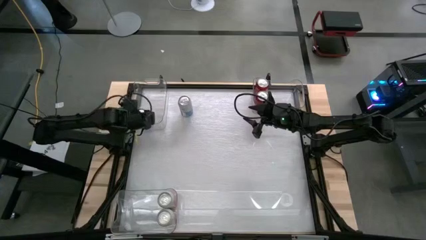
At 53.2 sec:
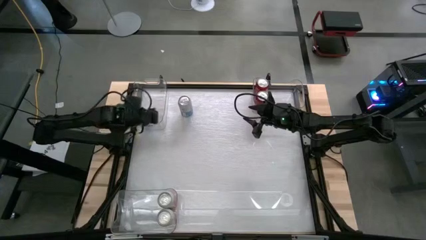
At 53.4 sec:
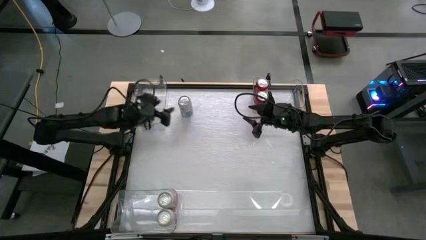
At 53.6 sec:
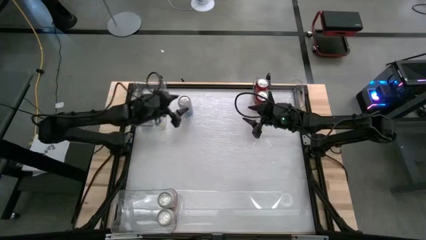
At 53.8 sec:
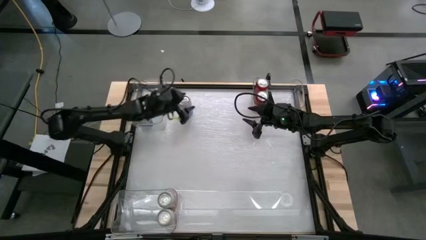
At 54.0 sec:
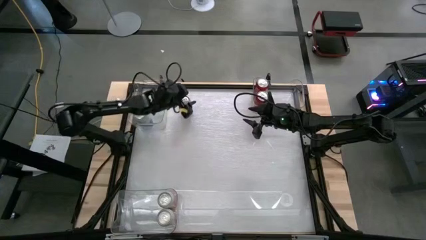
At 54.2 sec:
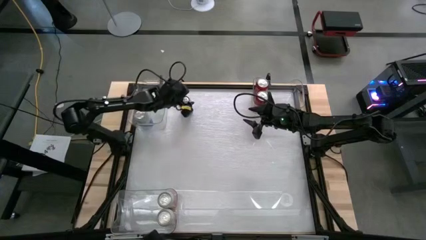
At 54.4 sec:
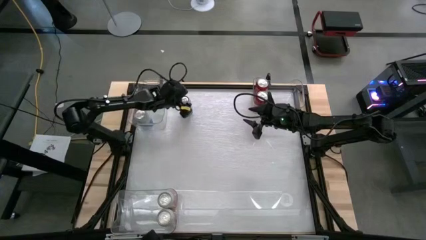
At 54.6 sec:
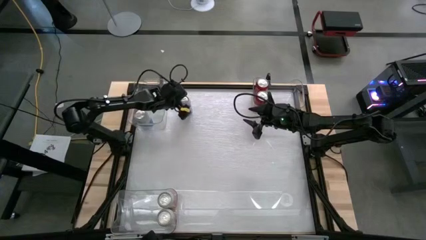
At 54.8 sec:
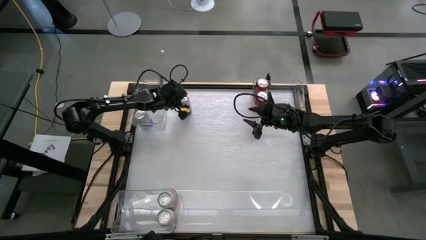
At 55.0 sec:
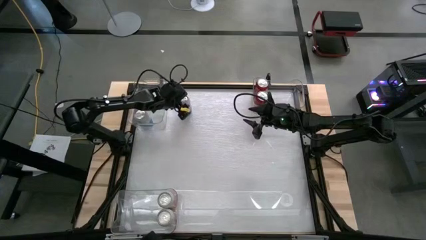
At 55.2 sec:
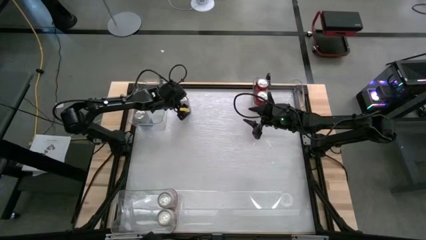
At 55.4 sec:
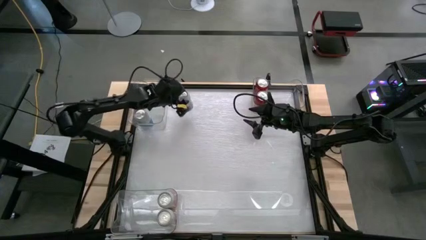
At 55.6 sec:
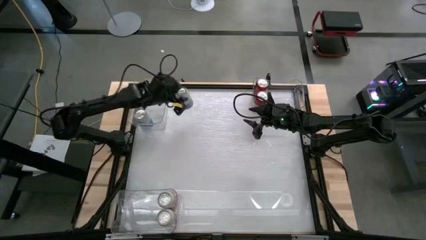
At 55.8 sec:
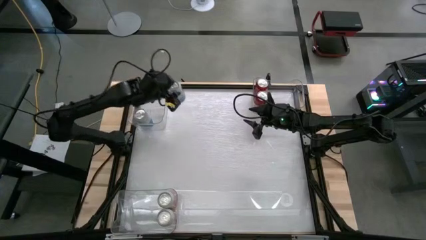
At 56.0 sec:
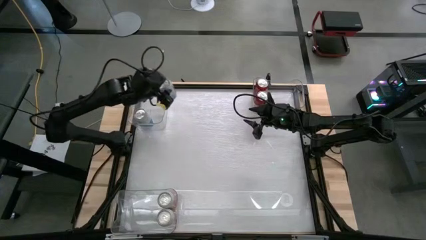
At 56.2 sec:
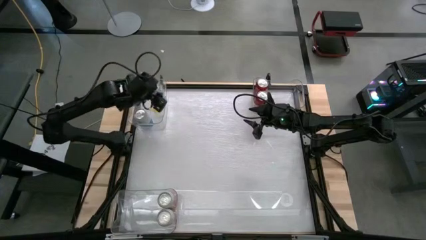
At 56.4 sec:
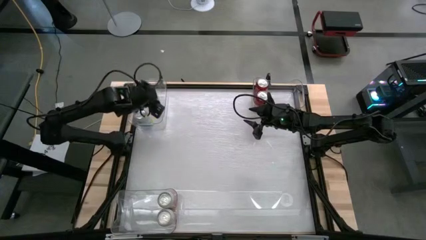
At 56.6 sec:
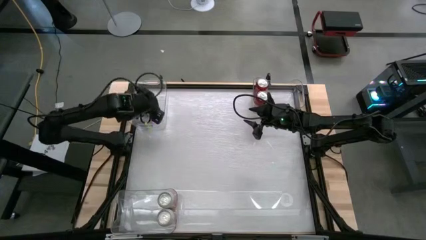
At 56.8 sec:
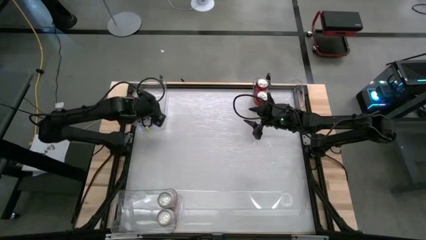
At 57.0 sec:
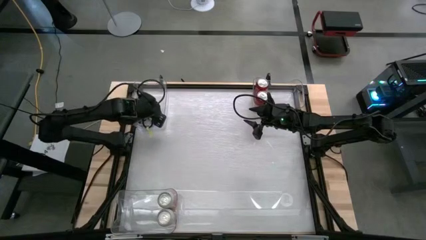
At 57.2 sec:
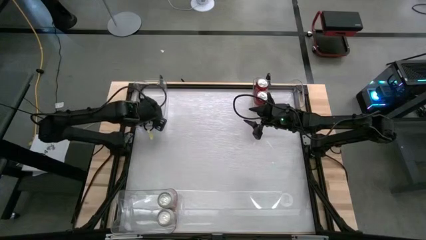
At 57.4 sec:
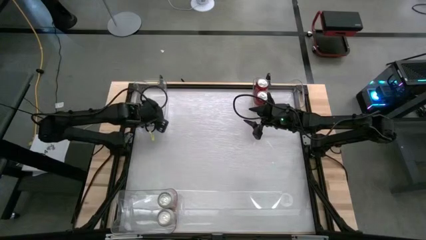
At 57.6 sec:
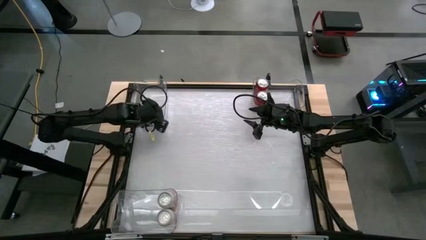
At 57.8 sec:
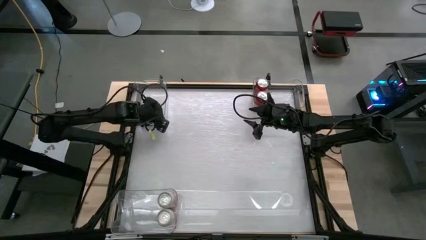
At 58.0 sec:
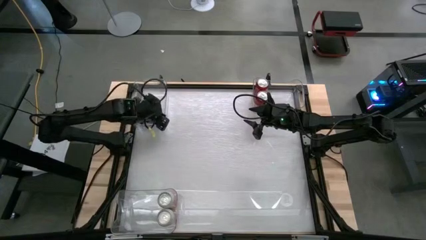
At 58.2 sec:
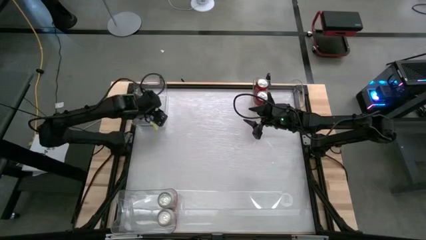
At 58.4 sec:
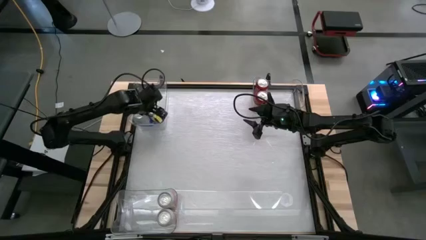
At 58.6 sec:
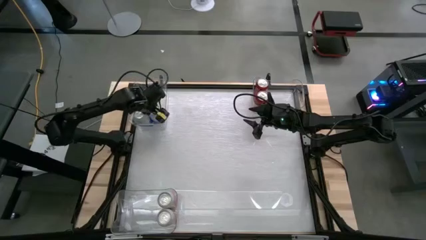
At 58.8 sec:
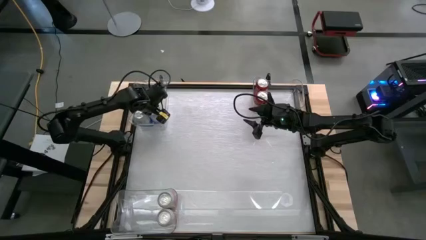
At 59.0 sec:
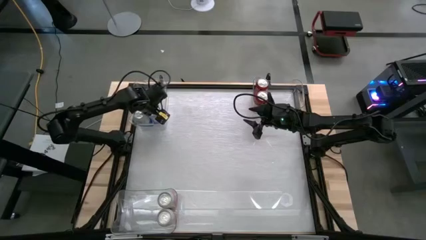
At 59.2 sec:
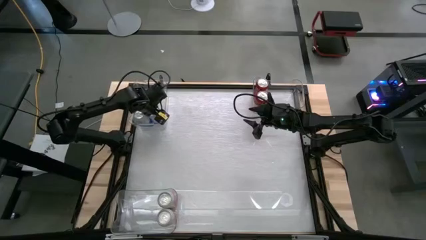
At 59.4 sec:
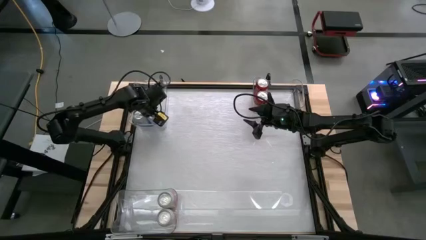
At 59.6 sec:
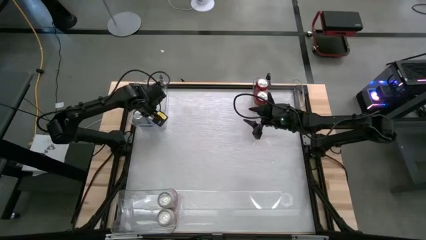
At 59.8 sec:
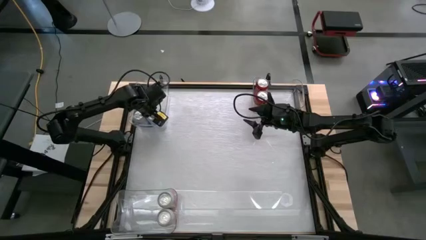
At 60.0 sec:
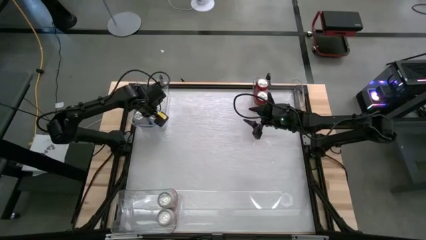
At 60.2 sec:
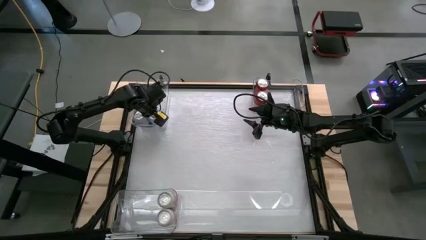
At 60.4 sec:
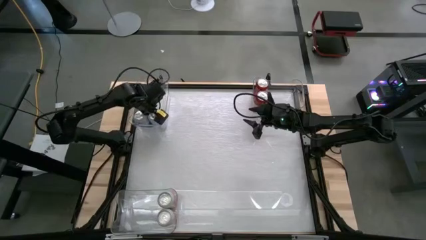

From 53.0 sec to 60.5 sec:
Task: Sort soda cans
Put the top blue/white soda can into the left transparent bin

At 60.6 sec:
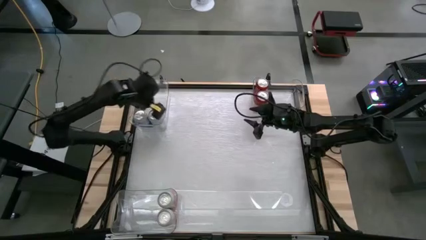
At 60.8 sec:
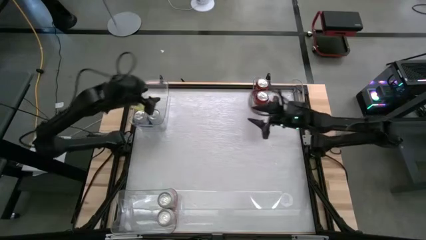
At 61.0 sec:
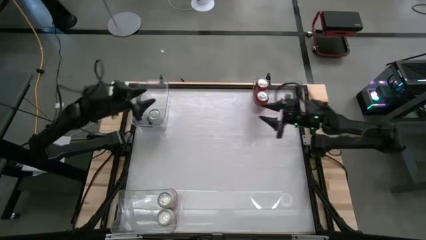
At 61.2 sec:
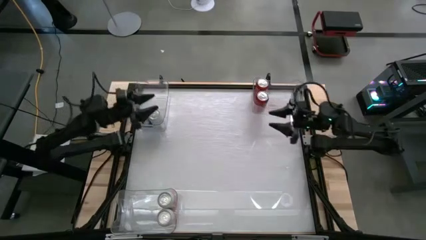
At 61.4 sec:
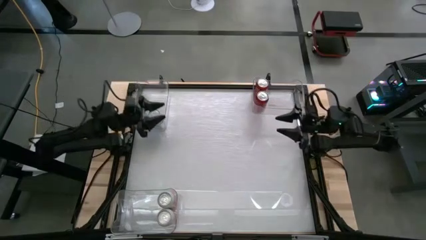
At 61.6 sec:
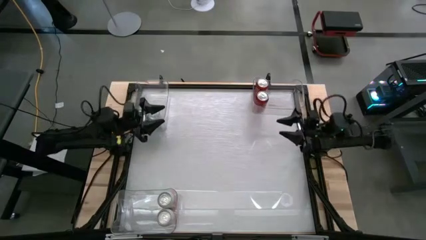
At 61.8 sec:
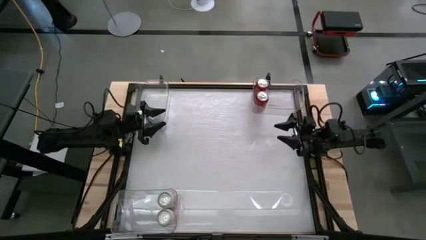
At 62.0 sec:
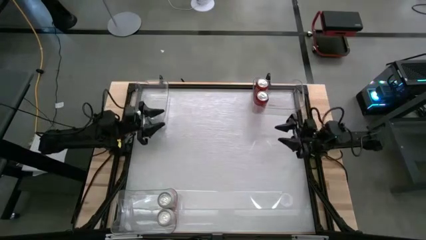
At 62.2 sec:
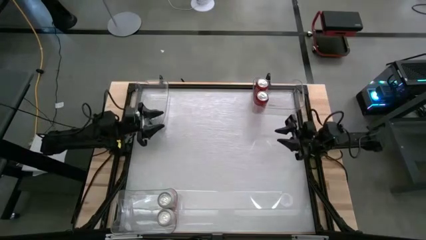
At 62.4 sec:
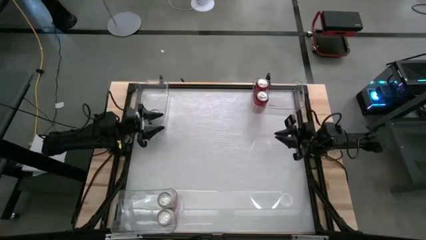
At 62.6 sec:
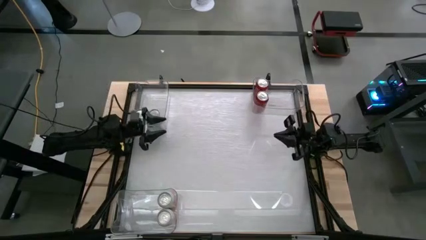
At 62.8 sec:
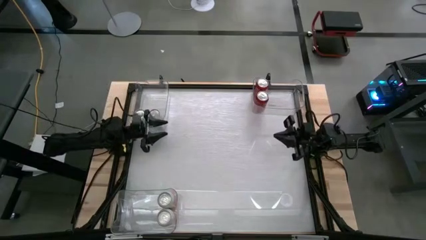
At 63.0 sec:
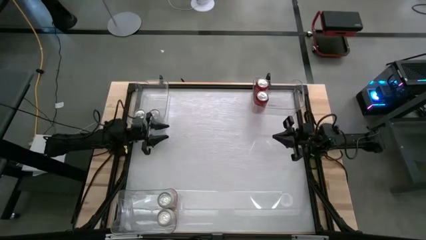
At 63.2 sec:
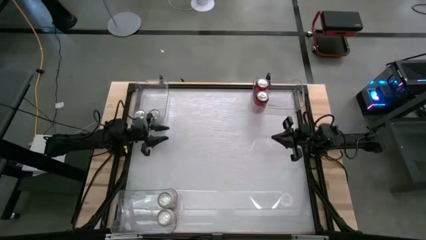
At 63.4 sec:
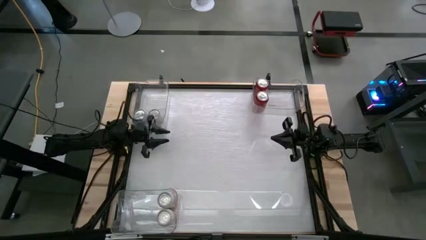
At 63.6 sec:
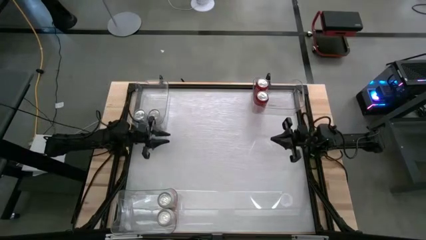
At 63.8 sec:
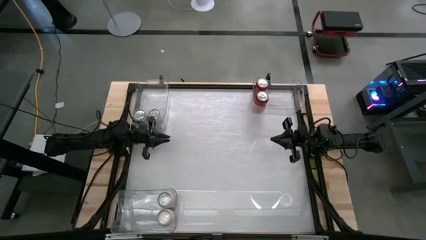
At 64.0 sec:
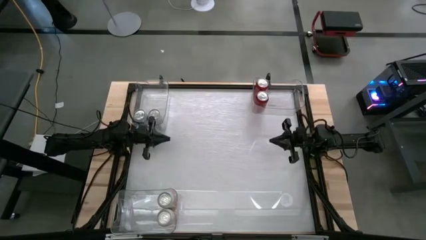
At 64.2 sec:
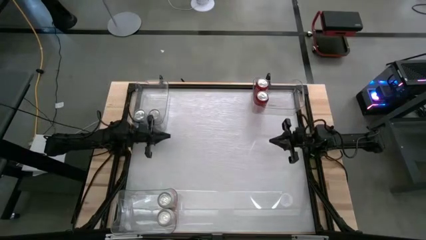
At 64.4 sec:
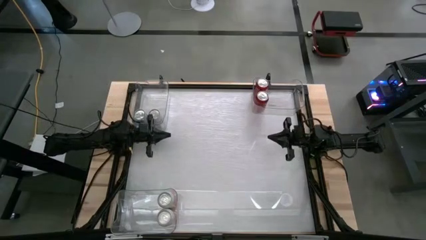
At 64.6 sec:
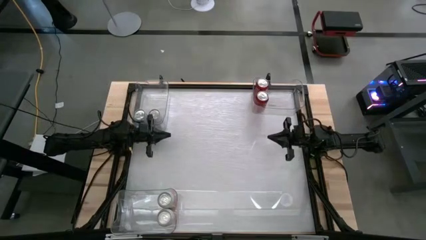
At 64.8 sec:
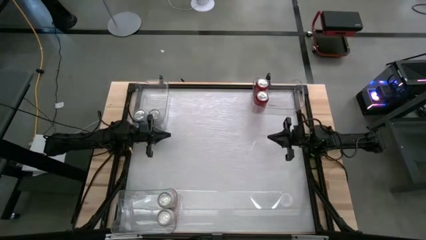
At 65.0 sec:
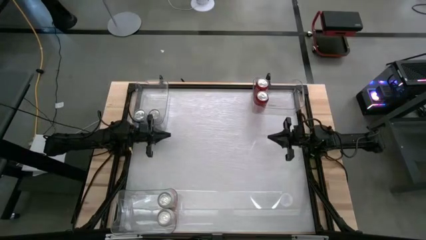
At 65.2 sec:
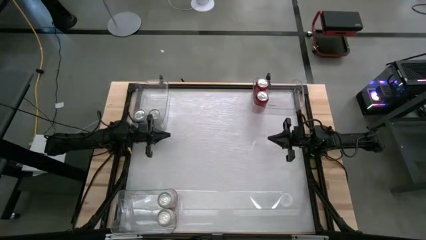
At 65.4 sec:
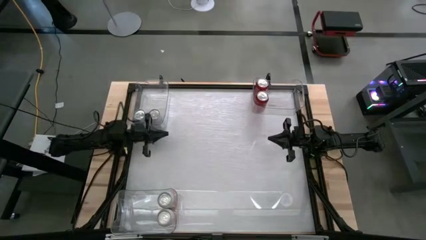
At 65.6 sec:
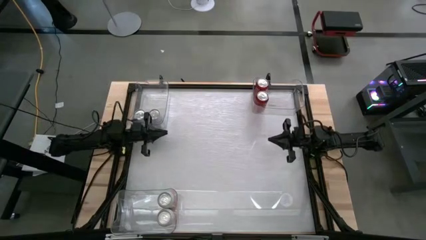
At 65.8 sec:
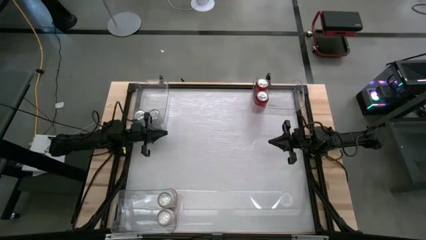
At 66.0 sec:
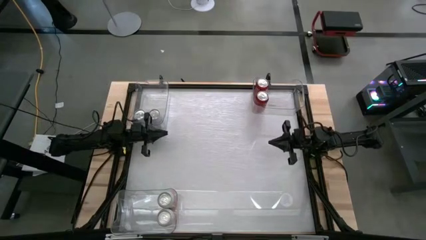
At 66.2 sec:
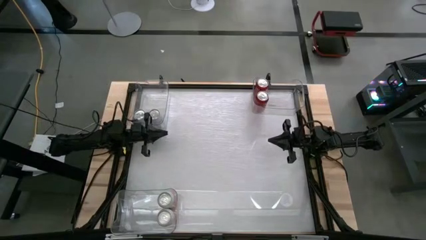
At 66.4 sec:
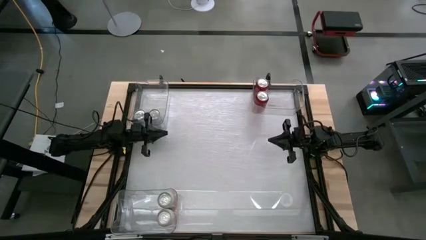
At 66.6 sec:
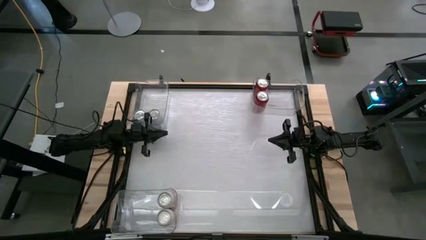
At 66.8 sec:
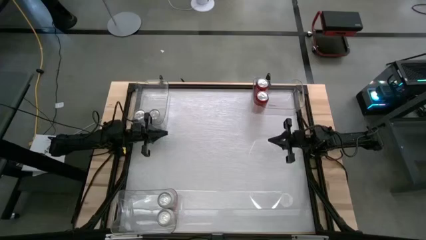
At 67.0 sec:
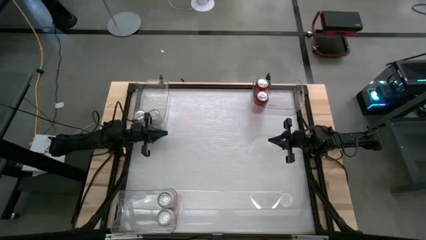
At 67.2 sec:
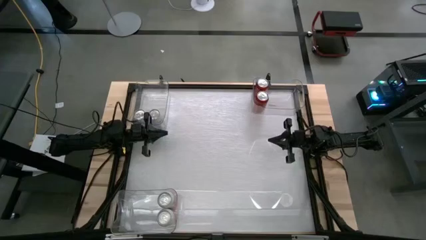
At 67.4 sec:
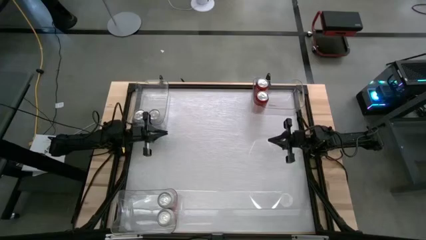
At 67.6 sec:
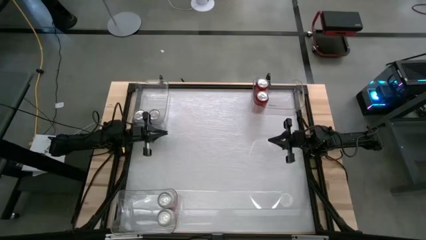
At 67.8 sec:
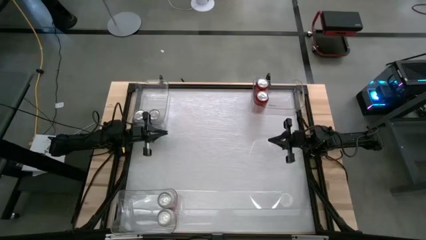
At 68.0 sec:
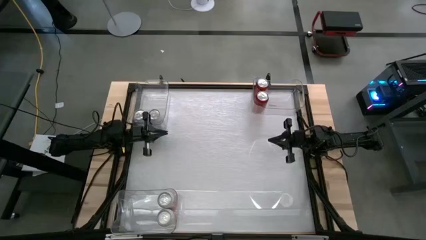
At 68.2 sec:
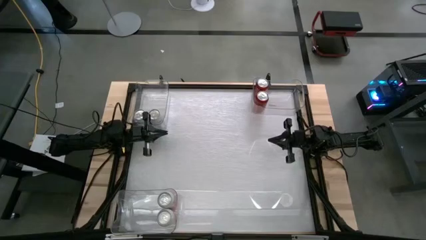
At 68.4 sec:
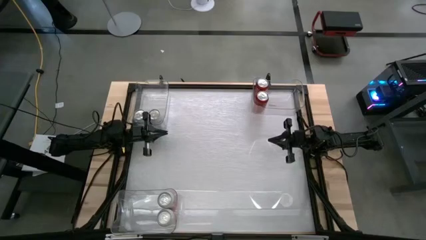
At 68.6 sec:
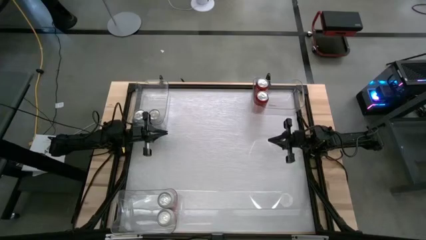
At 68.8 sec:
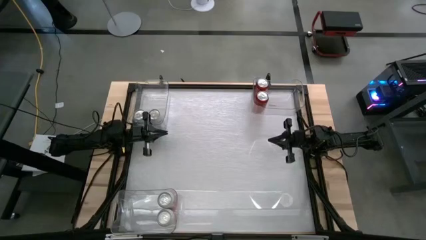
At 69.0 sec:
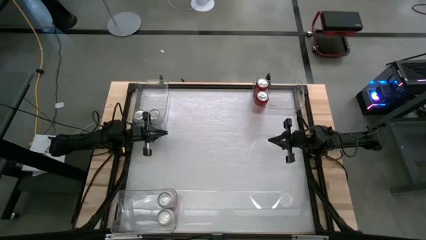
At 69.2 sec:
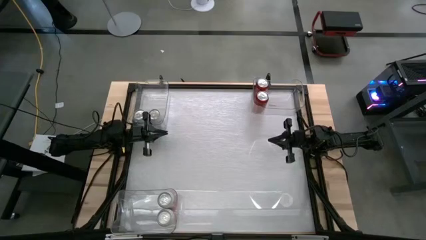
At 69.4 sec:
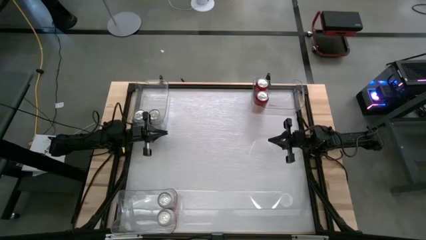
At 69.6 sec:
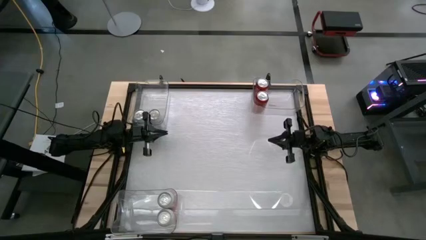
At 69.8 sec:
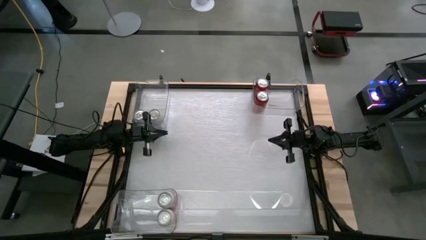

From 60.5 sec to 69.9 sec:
Return to Home Position
